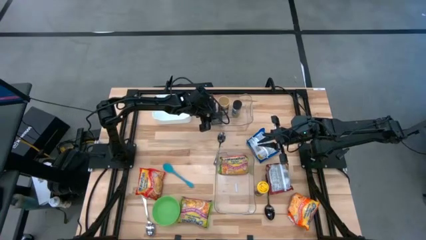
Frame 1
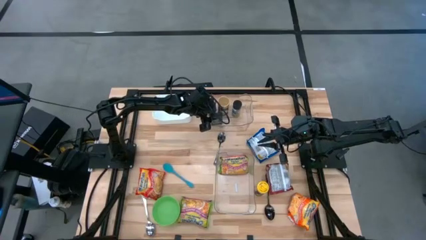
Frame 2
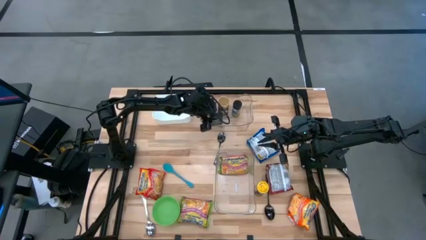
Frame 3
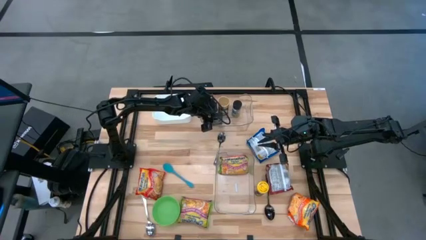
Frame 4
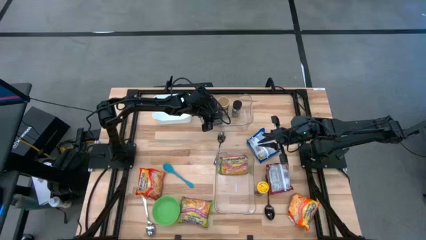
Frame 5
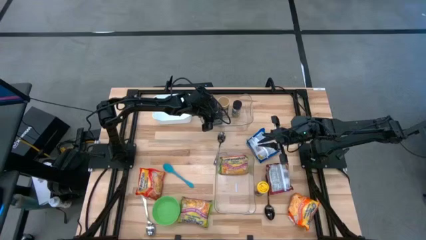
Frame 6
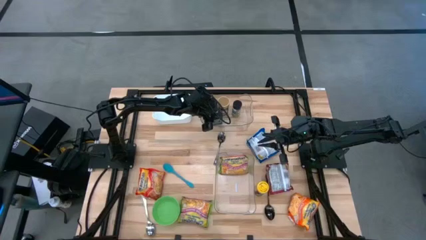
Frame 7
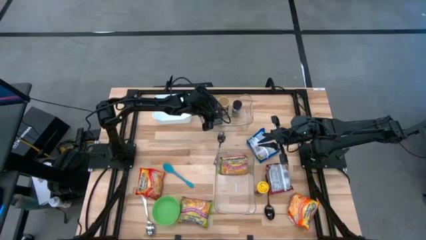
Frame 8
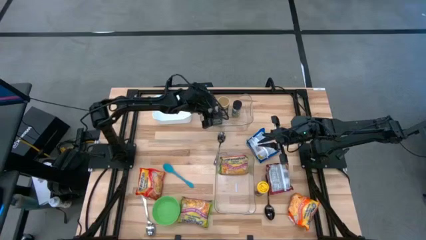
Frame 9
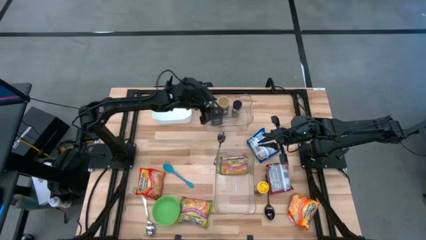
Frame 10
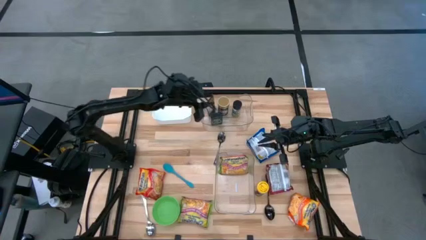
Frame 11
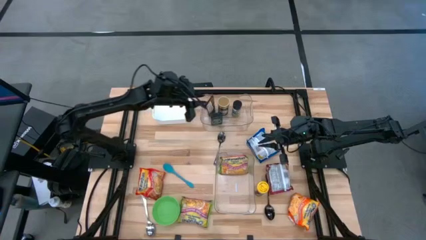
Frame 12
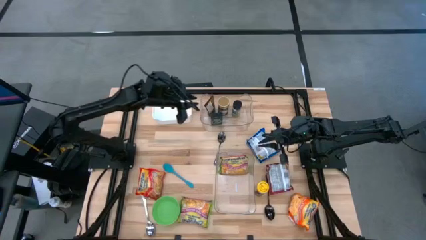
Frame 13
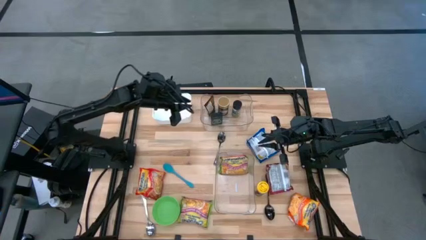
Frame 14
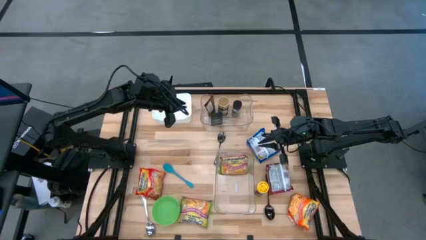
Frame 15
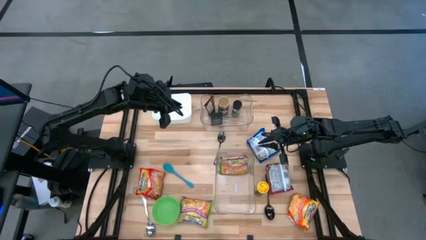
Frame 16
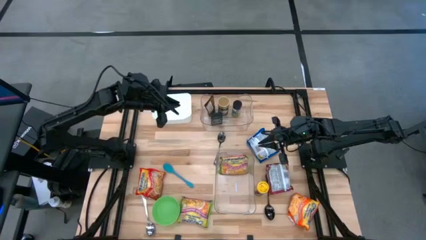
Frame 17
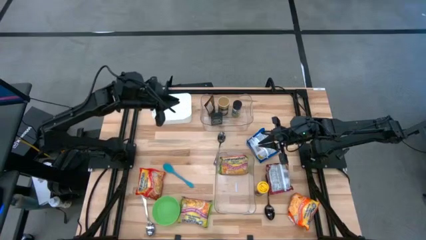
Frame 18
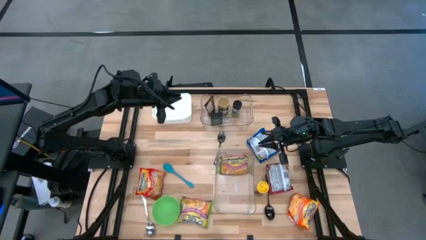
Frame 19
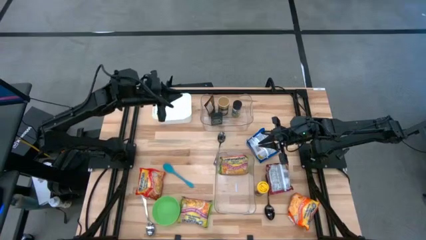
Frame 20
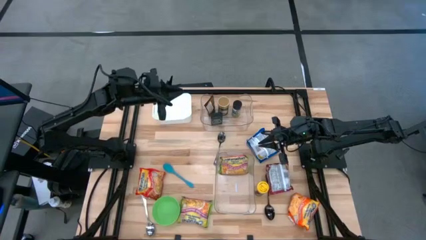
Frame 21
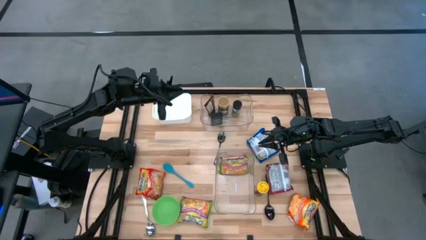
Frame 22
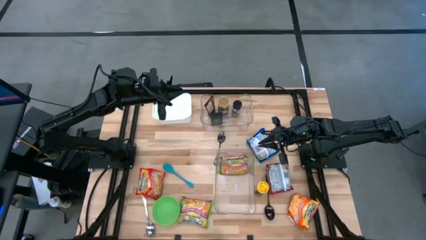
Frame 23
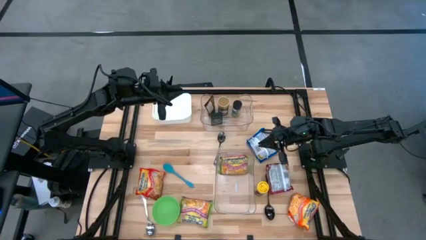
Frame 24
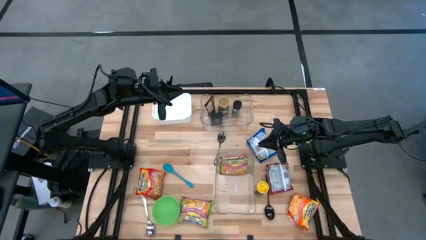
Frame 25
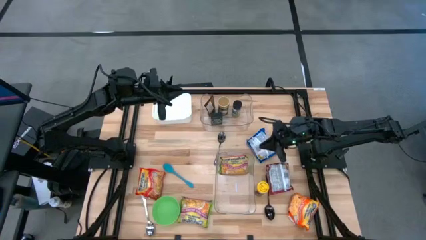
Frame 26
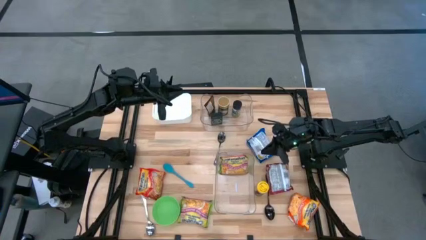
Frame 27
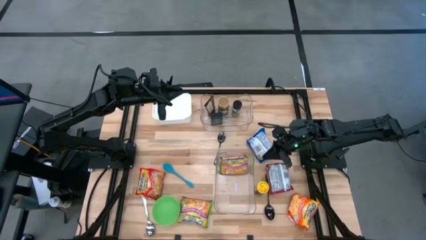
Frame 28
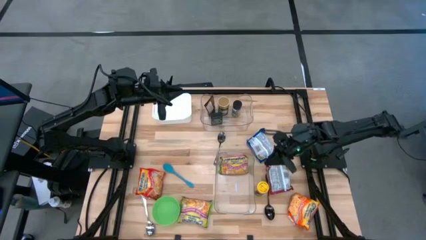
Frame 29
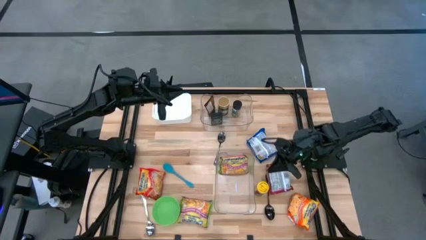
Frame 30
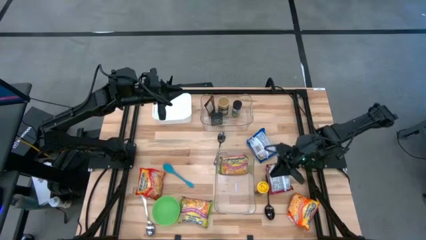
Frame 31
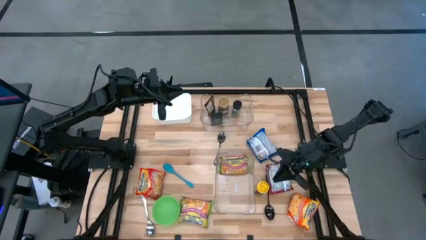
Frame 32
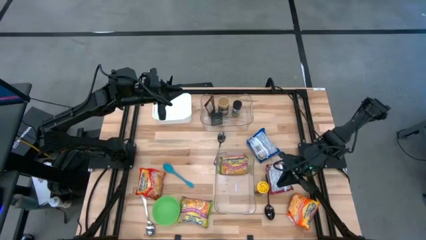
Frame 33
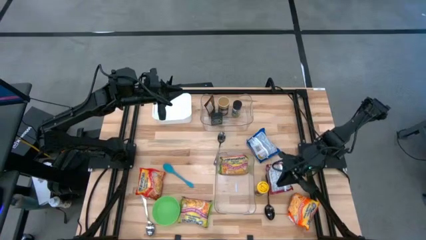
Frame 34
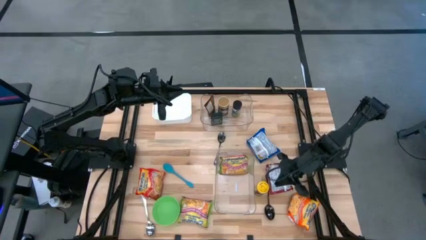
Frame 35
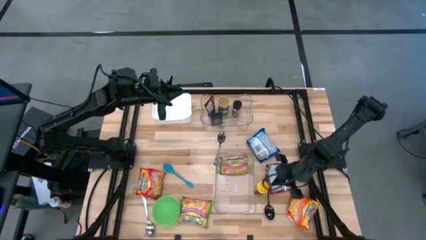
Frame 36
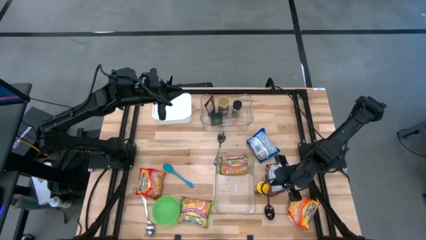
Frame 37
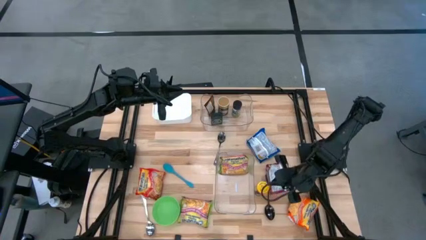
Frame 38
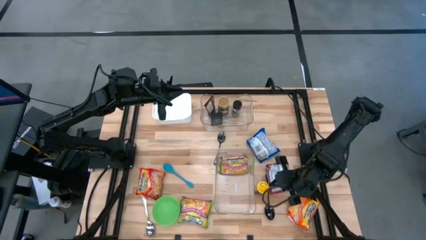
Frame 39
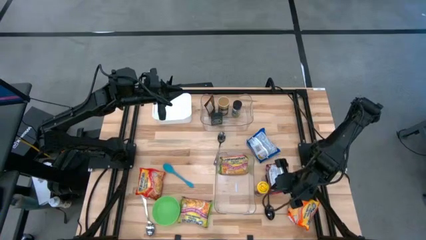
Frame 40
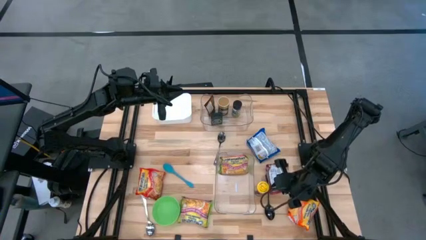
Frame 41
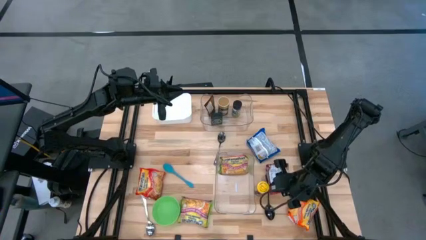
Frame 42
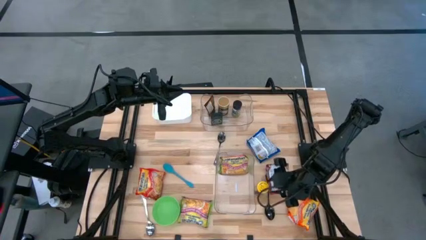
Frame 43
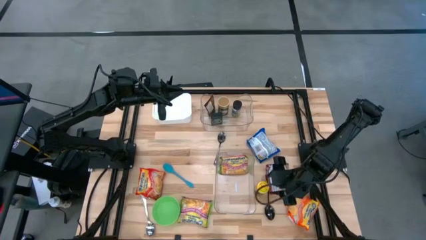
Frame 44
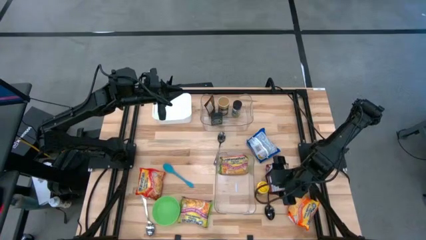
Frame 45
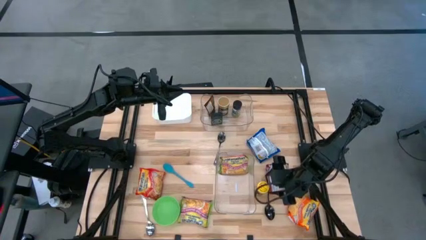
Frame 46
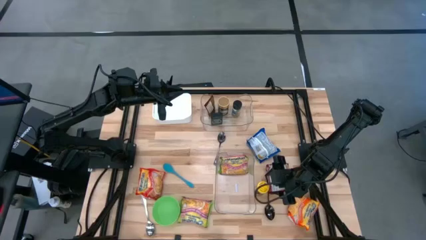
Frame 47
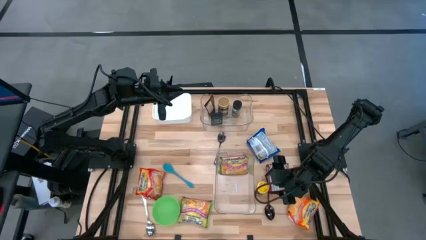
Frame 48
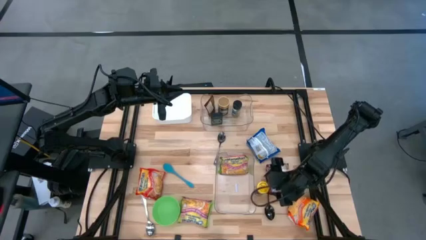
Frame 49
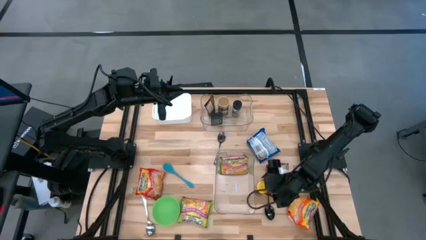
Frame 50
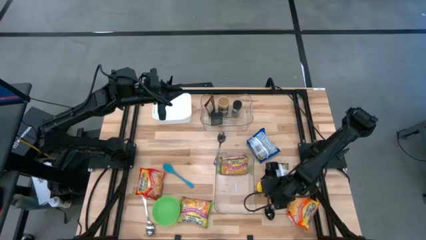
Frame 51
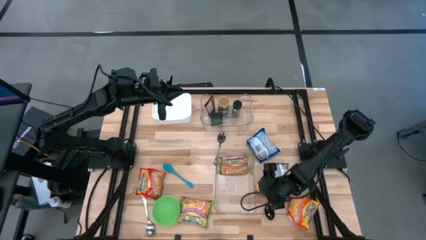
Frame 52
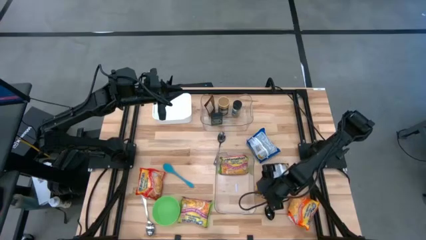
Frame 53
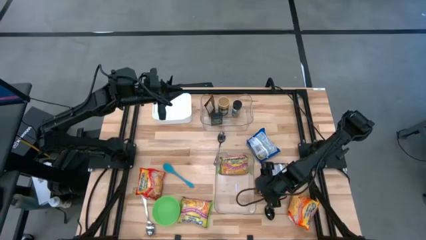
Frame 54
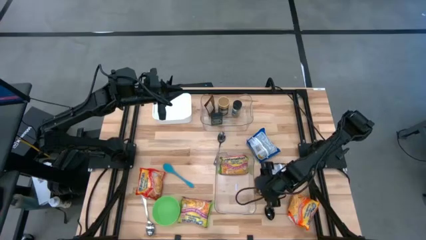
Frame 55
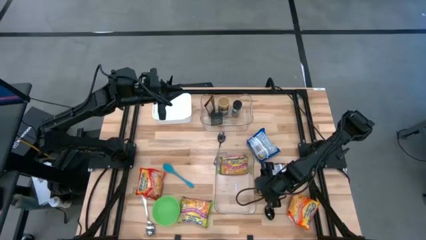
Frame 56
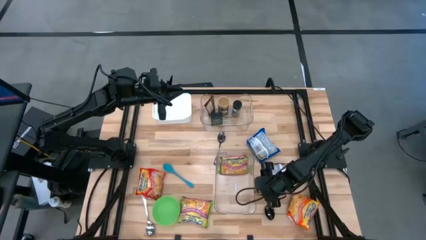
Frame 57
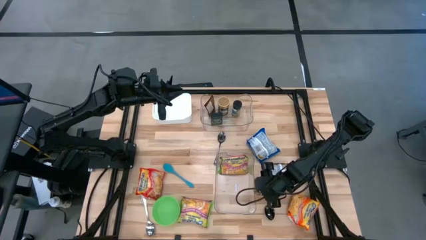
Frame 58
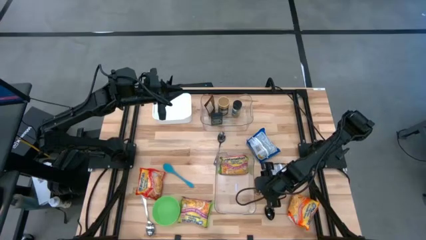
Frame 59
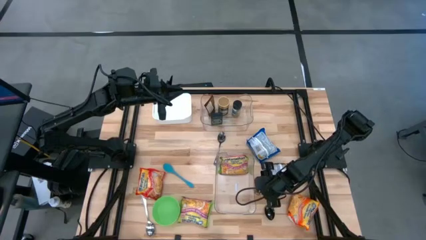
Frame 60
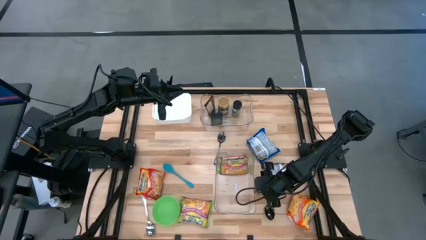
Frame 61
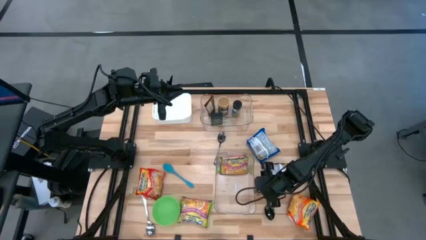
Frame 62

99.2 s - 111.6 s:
Task: Pick & Place Food Item
Put the yellow seasoning bottle into the top transparent bin
